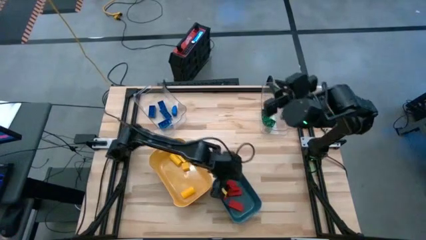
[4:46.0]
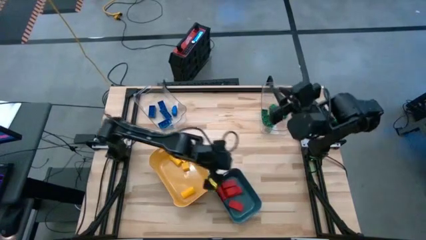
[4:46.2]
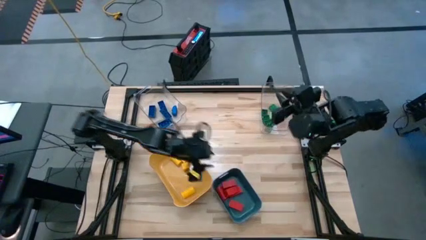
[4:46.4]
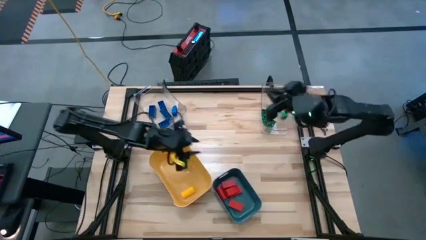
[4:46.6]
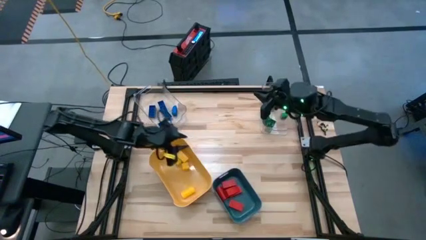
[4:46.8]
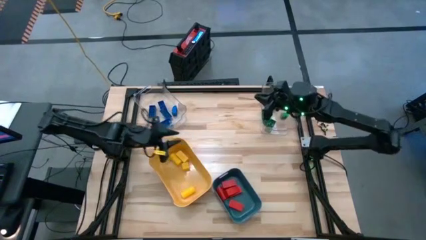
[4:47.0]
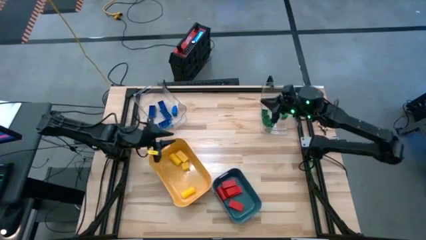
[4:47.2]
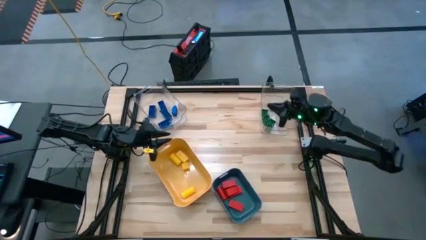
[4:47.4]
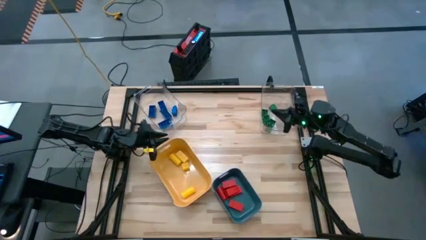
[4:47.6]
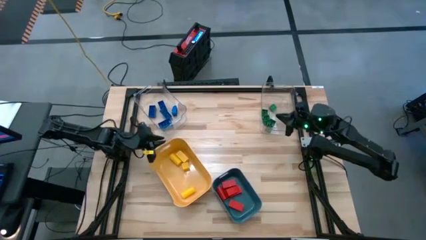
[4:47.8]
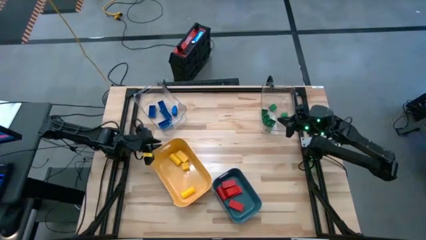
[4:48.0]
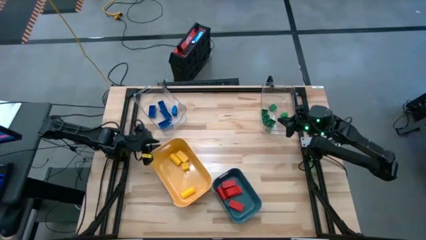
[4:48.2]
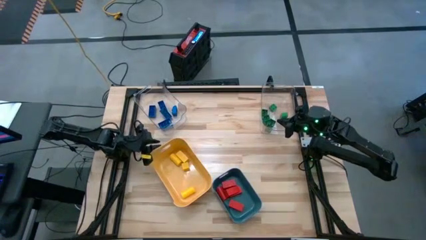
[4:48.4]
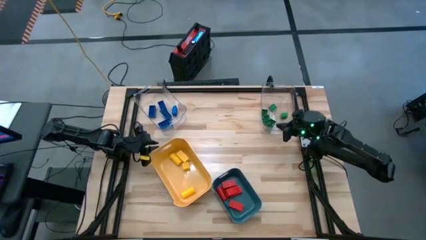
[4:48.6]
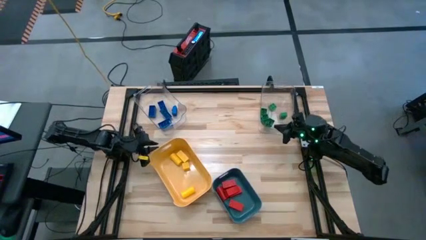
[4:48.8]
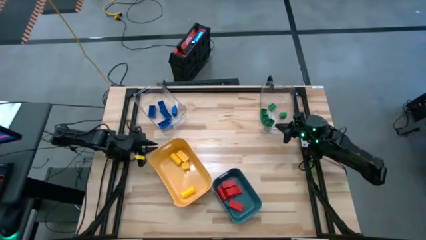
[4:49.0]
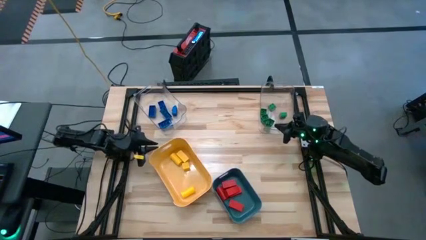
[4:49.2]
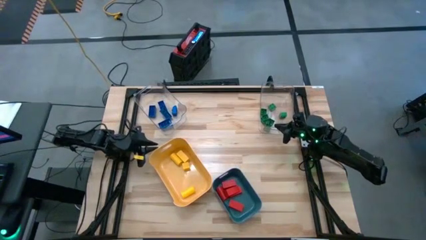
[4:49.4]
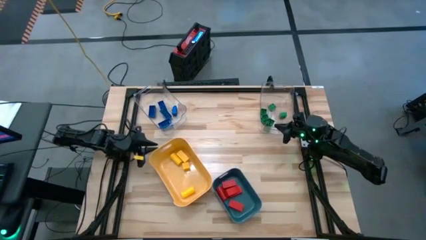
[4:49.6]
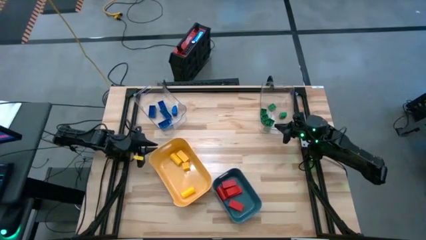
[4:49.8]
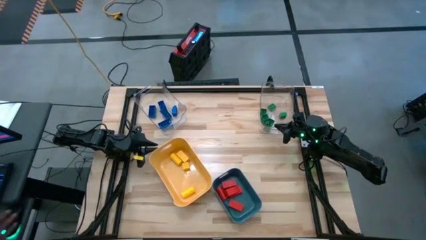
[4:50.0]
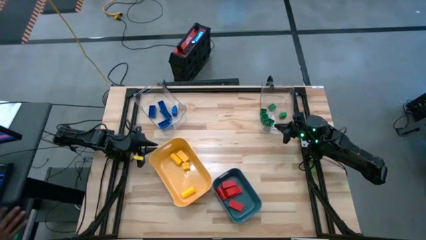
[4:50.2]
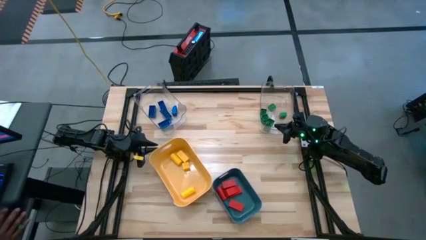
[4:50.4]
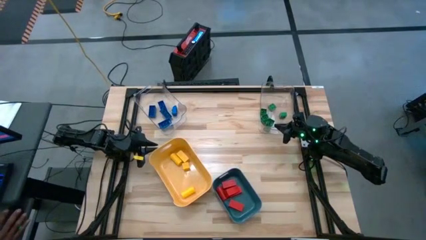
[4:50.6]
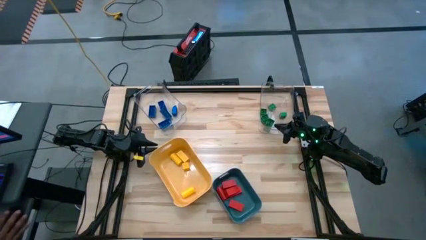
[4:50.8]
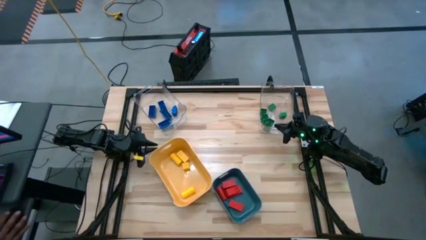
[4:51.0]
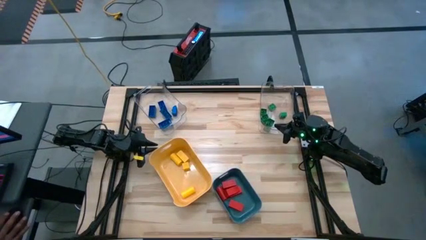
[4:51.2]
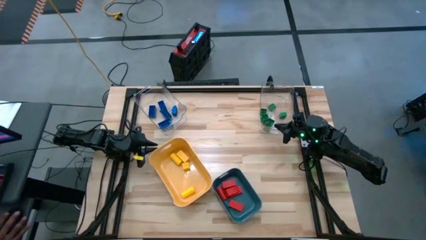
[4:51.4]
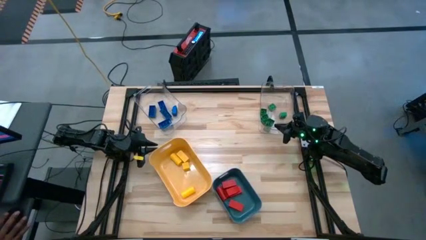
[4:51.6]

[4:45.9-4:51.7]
Task: Sort blocks
Return to Home Position

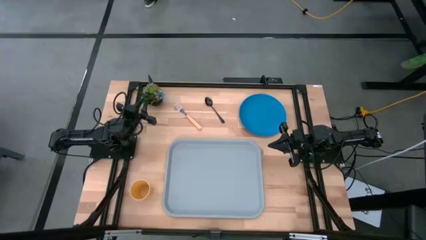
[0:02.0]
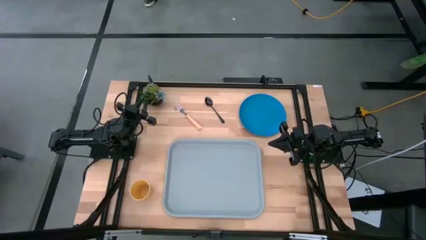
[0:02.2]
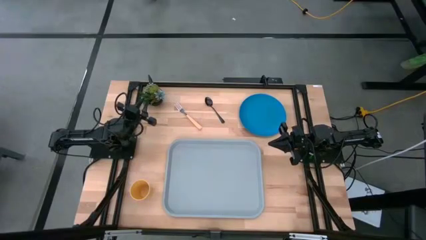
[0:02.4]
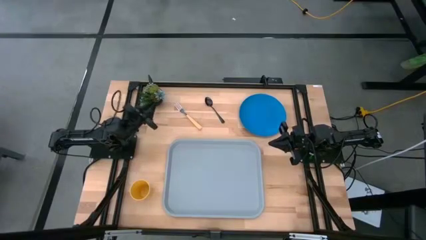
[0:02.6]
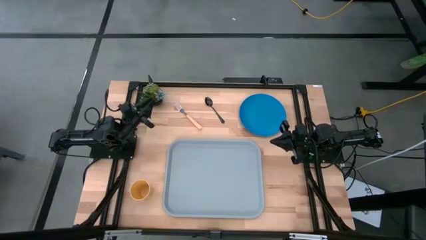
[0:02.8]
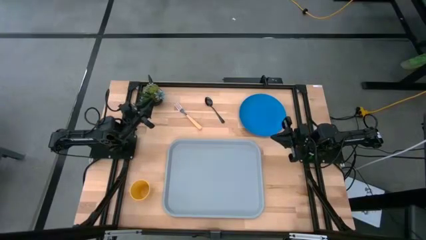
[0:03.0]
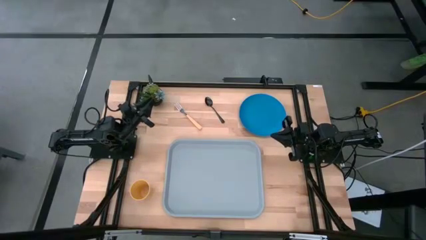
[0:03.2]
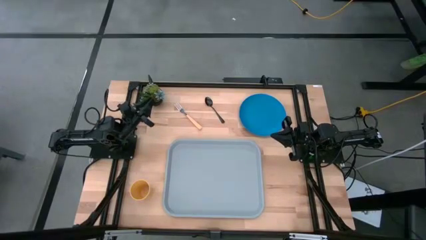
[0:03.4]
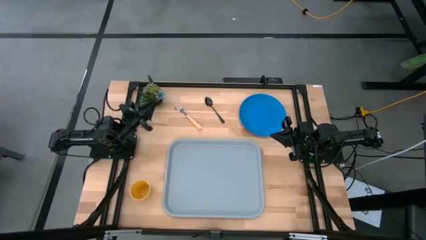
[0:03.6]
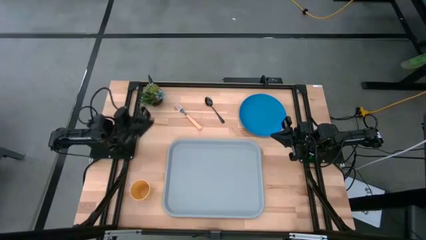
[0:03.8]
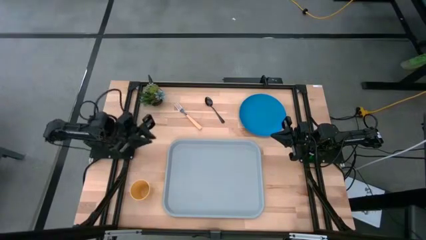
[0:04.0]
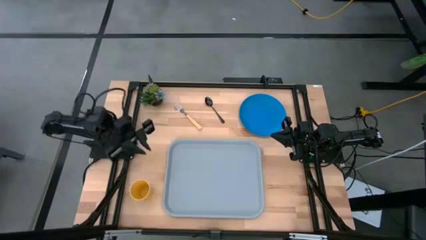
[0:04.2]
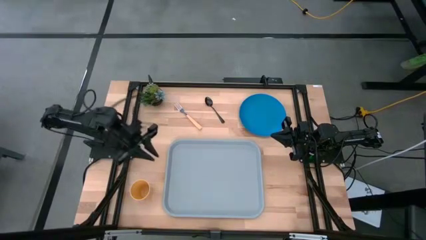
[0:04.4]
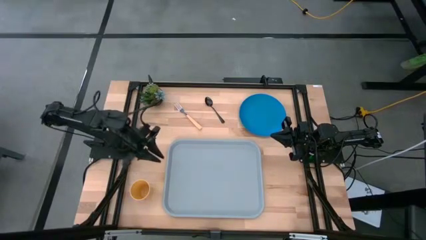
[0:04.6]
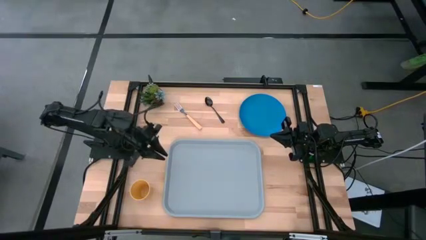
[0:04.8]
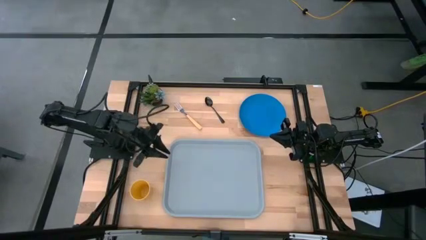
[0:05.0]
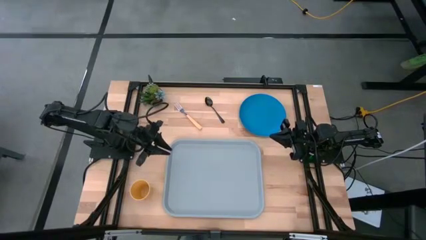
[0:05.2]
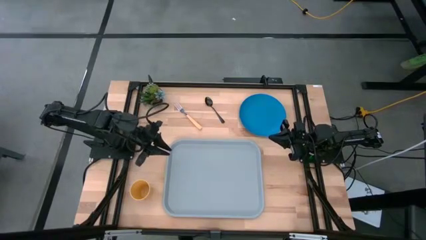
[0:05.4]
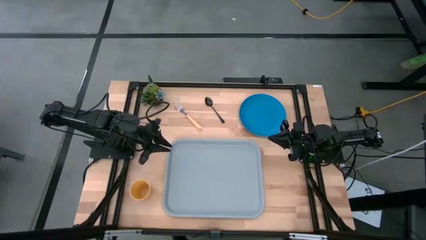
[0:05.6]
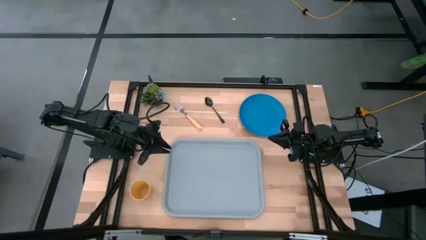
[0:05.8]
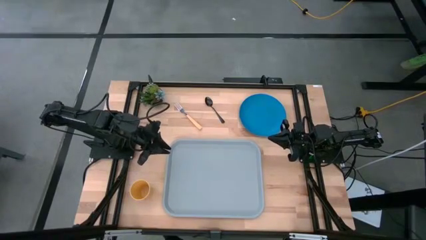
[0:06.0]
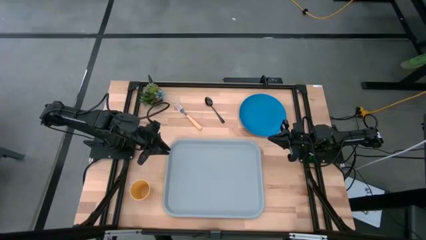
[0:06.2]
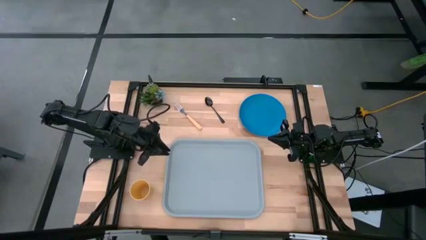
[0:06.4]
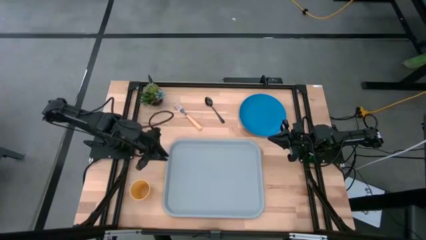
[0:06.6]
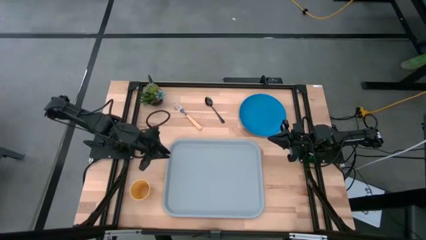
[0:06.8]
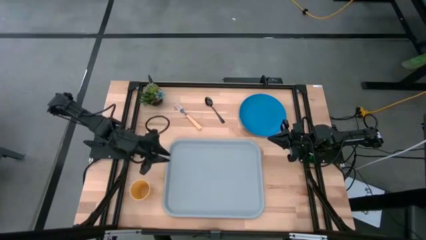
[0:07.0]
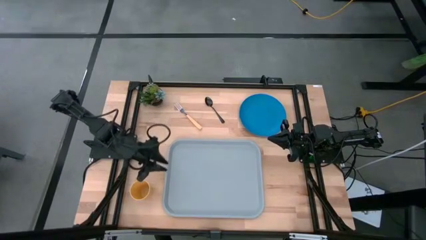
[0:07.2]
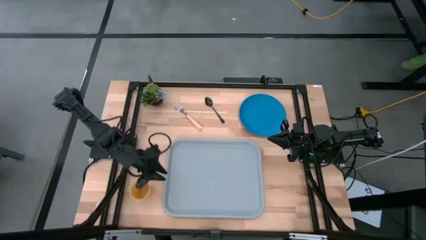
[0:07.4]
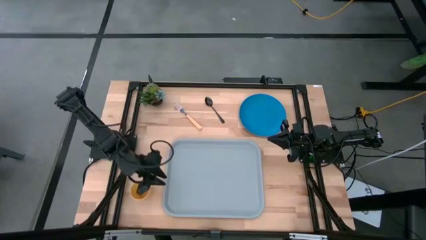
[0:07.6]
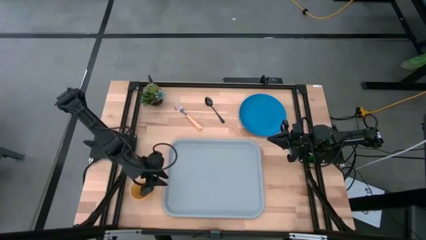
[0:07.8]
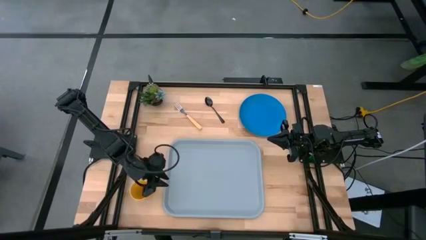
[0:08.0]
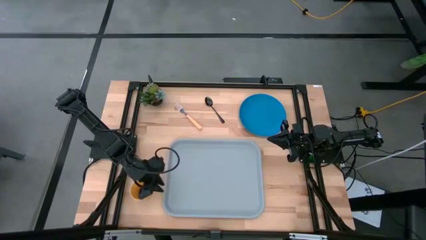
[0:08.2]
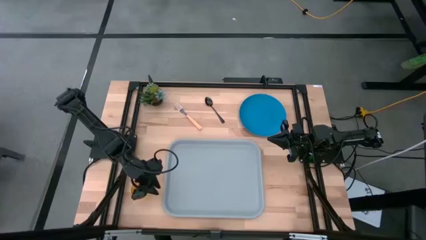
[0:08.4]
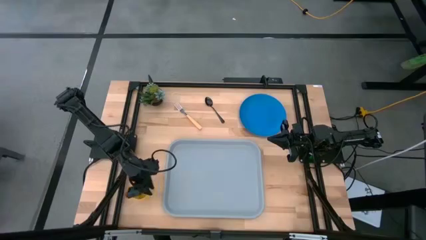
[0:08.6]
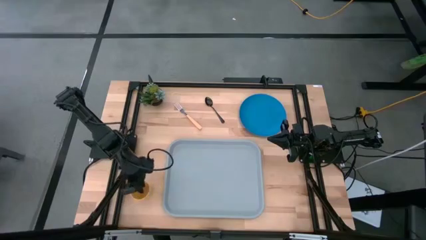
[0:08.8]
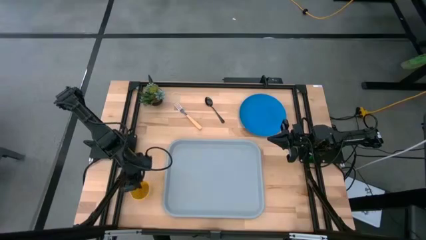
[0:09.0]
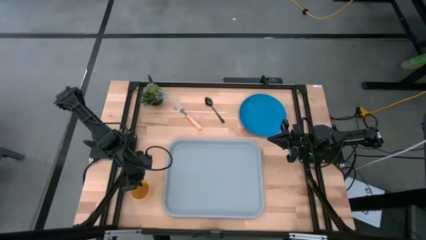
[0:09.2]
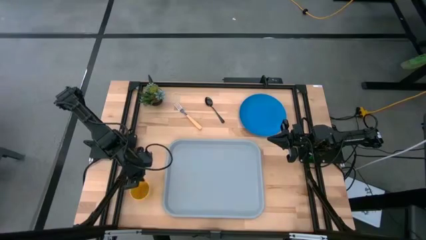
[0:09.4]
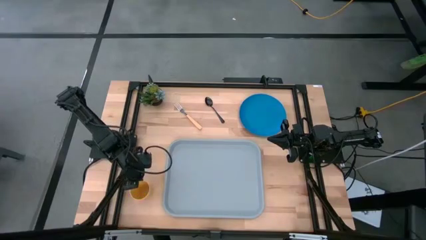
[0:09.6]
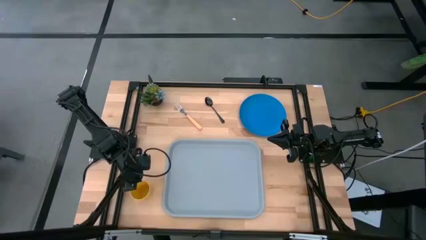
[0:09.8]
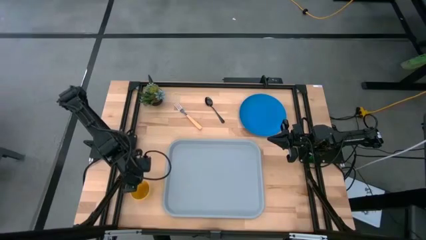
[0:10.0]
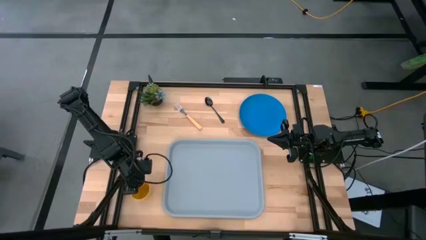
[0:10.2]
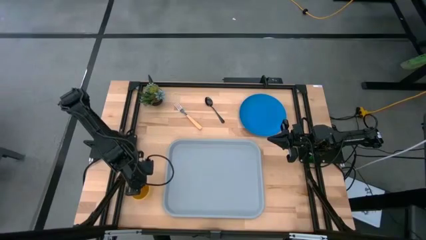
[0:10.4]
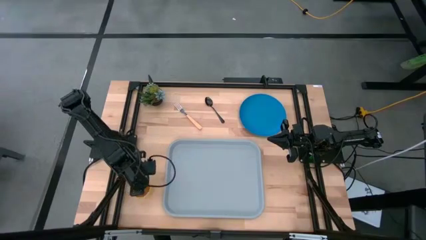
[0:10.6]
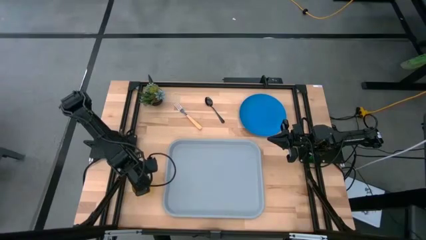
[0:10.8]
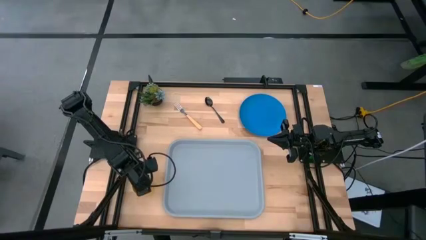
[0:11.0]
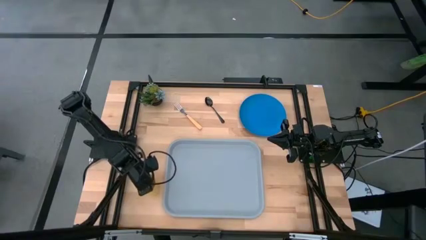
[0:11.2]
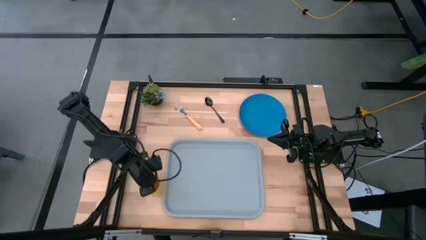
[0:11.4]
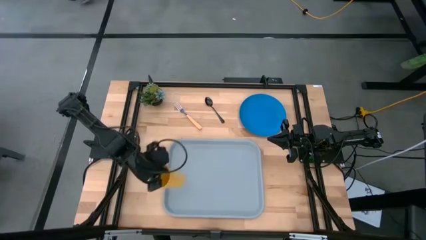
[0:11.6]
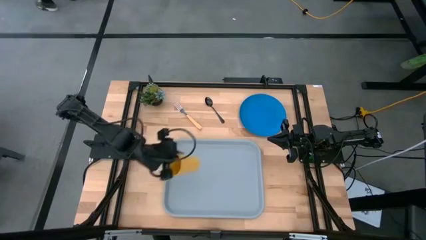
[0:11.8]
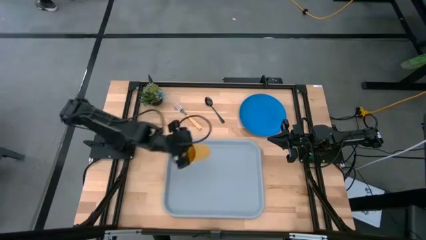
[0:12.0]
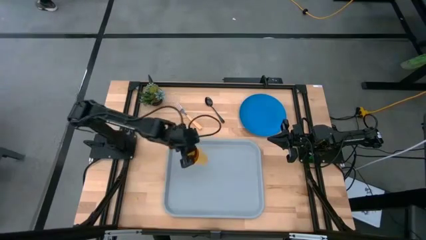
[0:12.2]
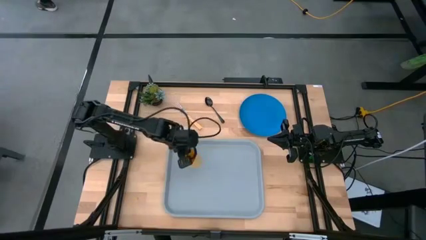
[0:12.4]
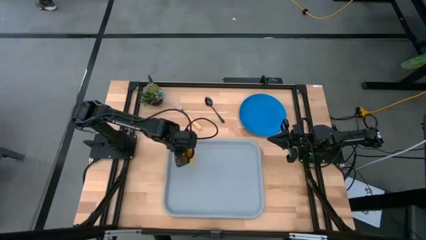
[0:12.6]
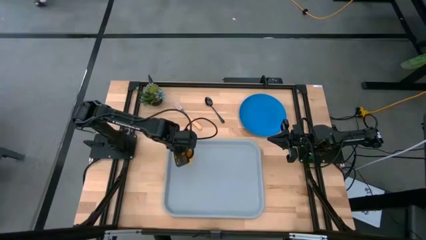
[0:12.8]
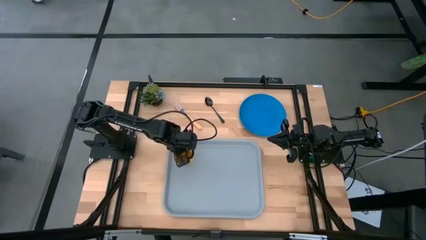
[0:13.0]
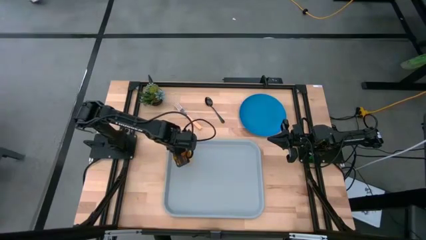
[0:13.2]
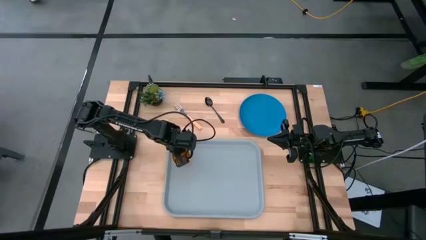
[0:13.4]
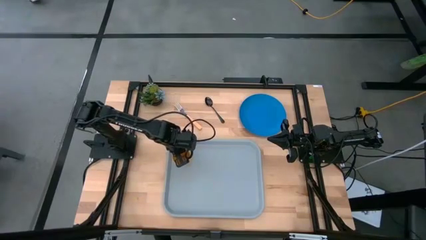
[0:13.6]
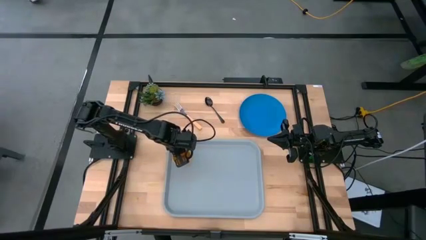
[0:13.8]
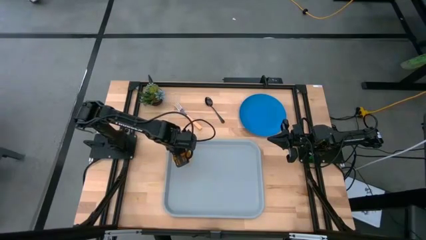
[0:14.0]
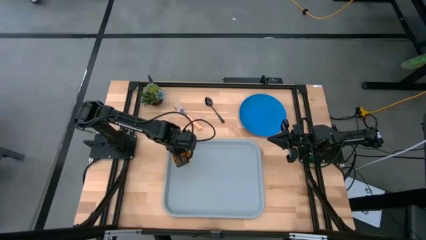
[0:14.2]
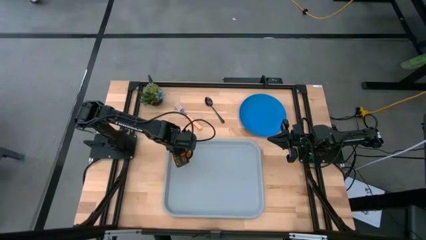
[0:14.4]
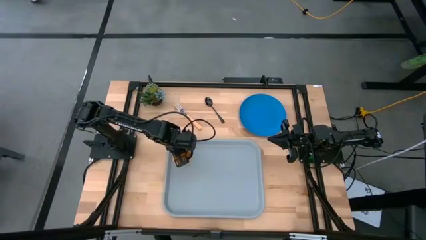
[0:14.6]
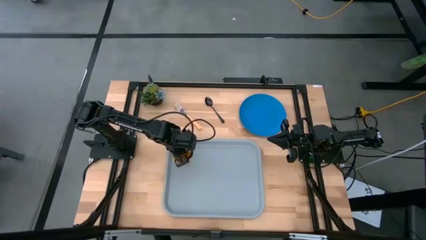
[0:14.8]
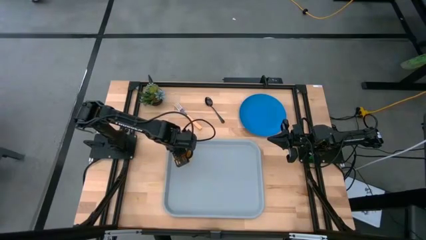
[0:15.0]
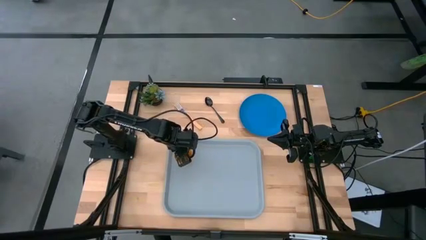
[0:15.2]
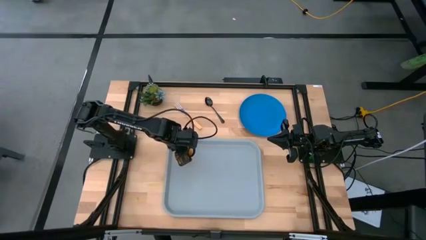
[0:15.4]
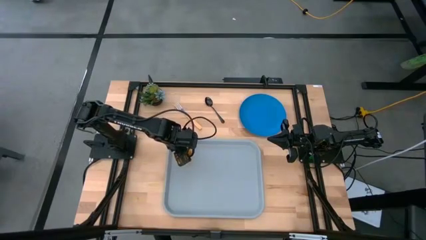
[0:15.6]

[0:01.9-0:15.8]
Task: Pick and place plate/cup/fork/spoon on tray
Put the yellow cup on the top left of the gray tray
